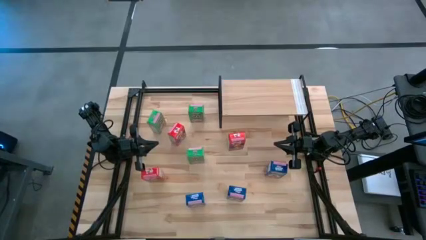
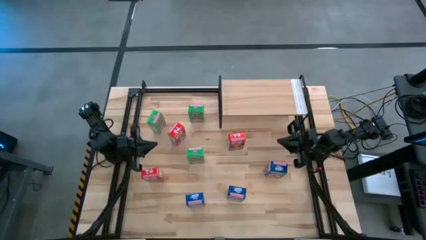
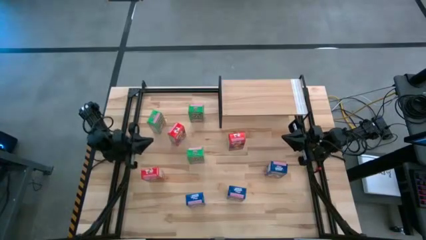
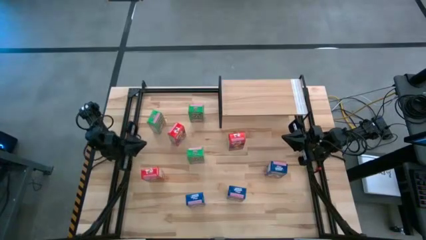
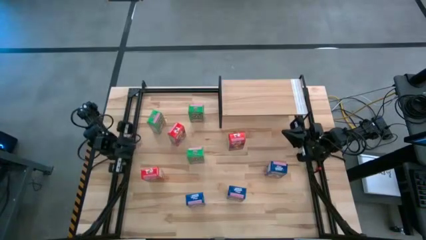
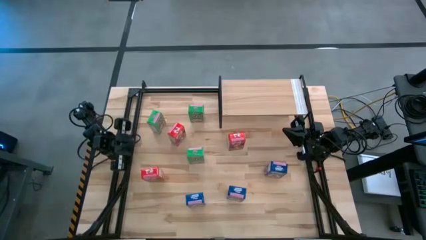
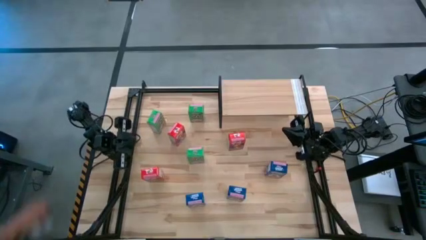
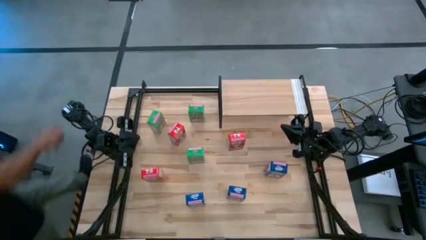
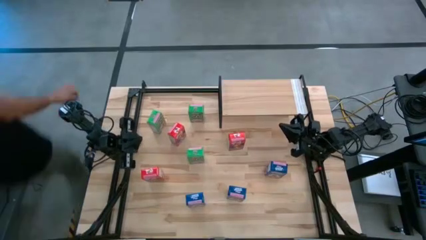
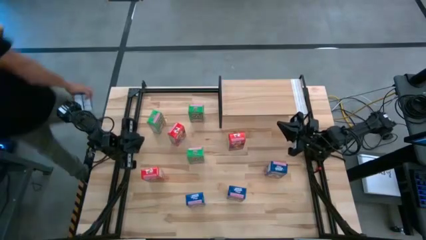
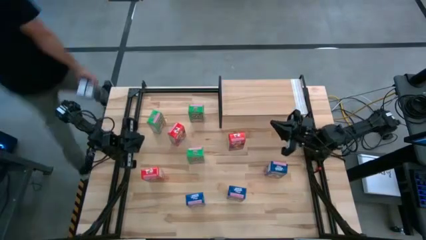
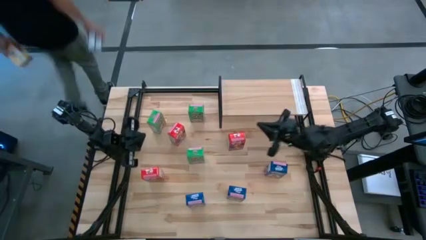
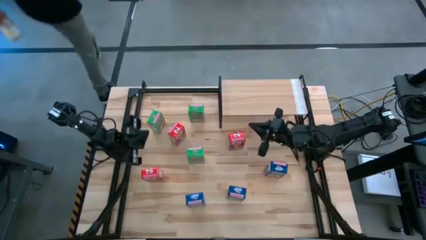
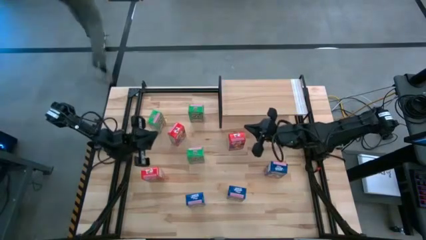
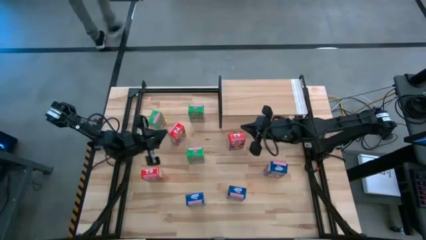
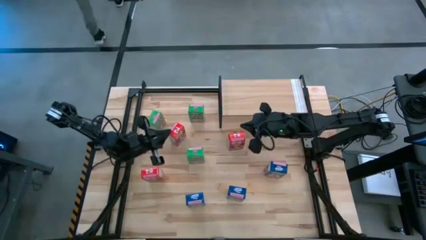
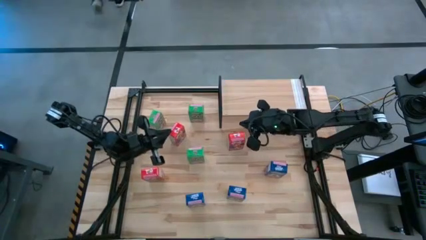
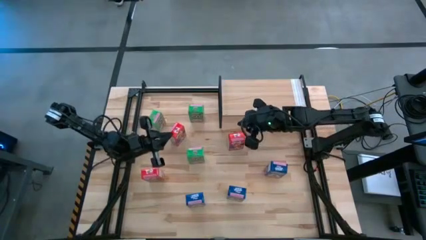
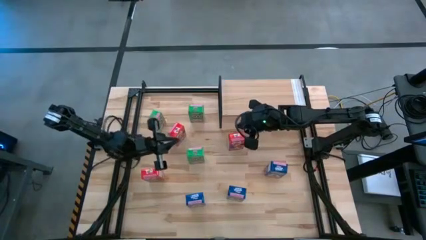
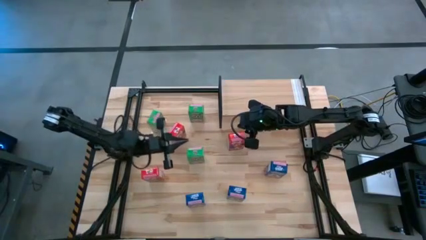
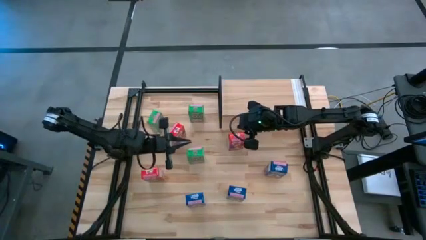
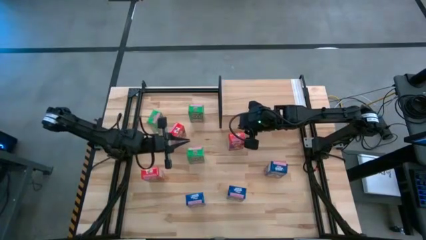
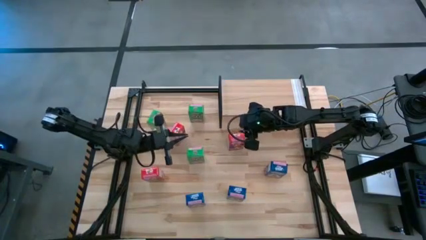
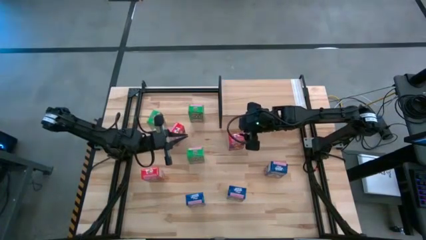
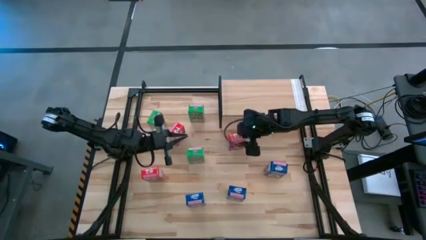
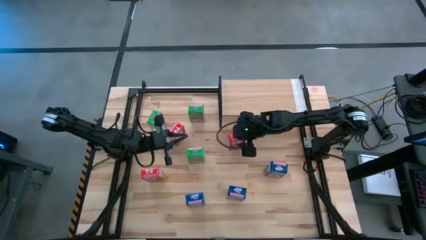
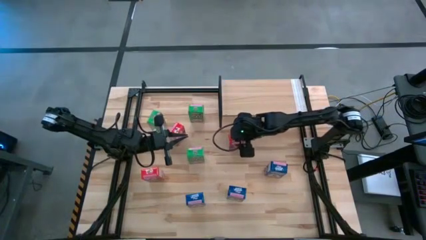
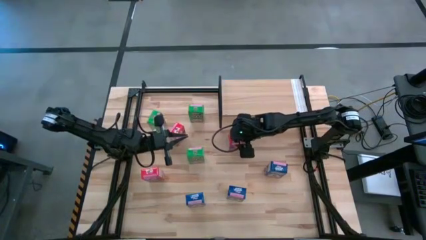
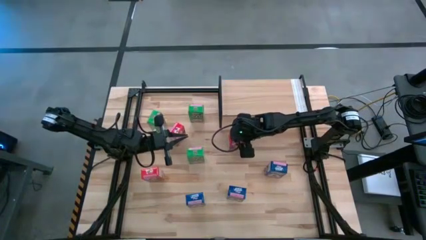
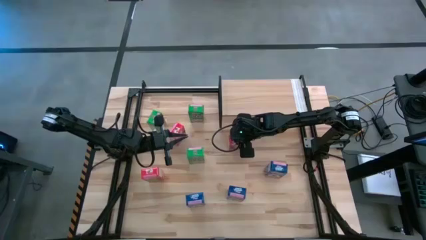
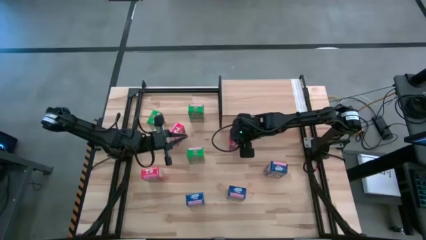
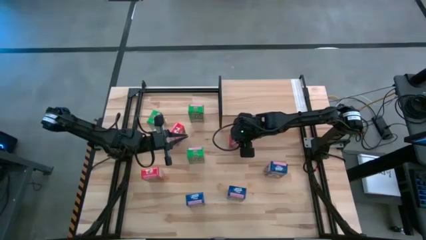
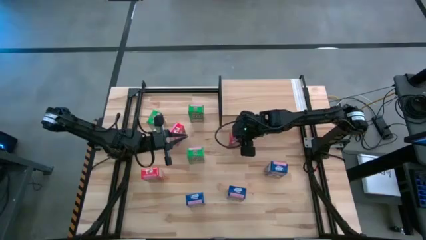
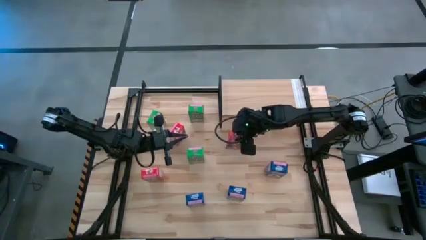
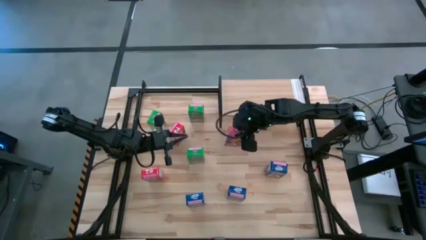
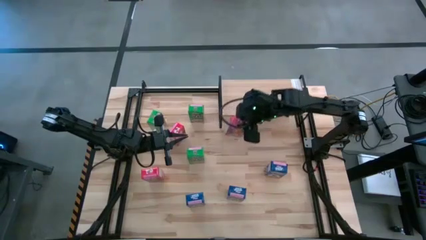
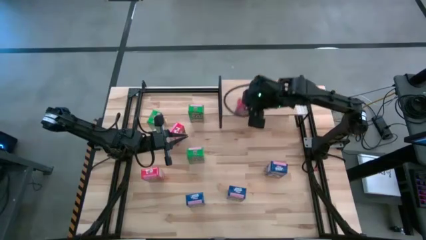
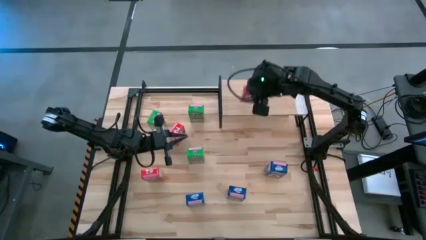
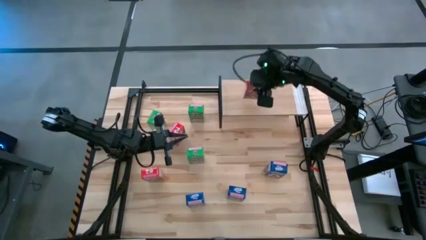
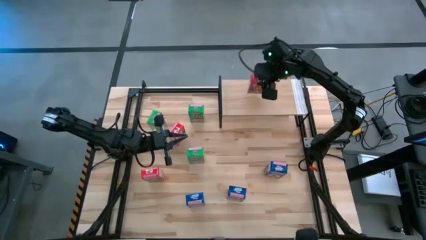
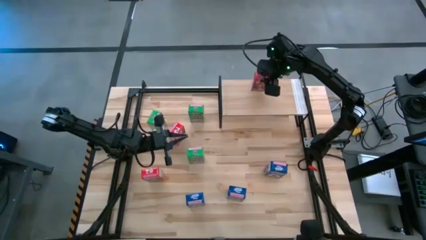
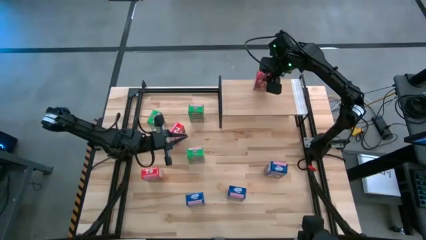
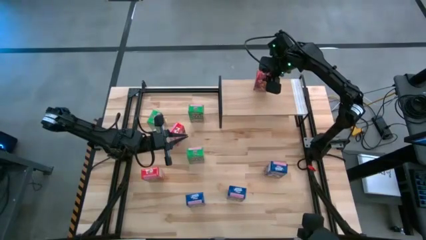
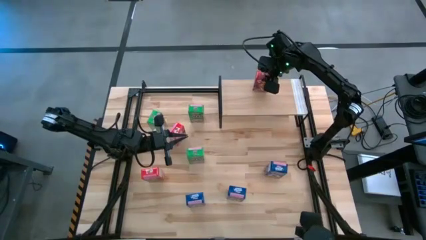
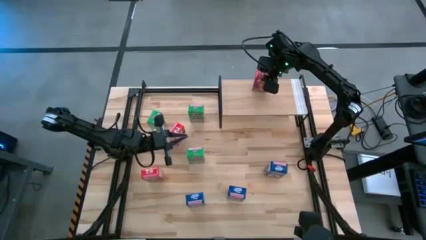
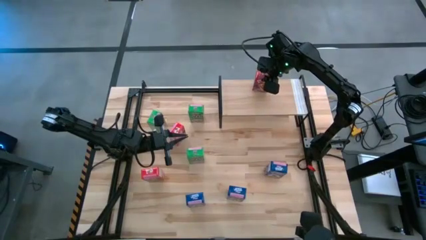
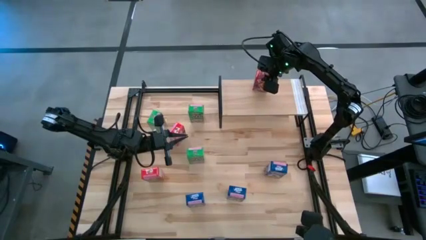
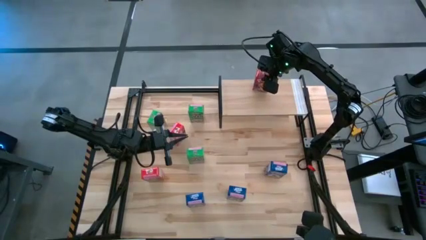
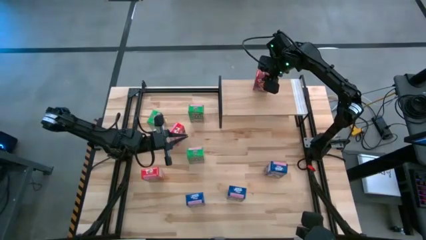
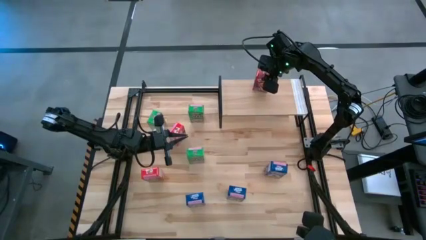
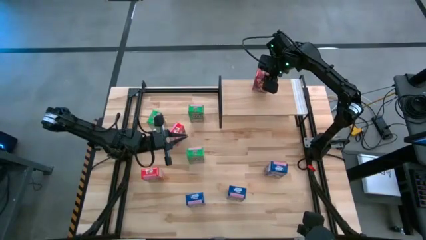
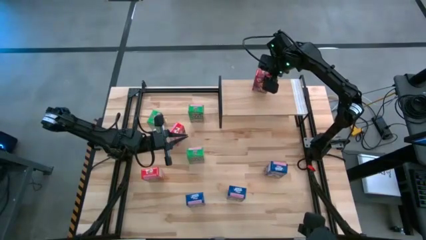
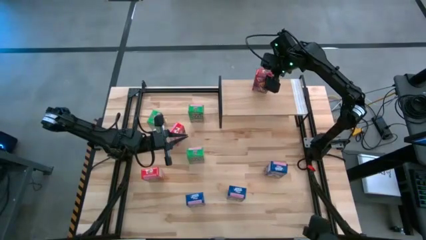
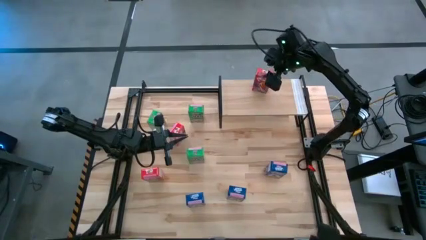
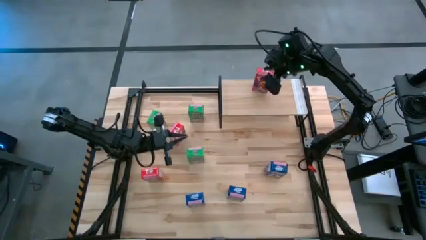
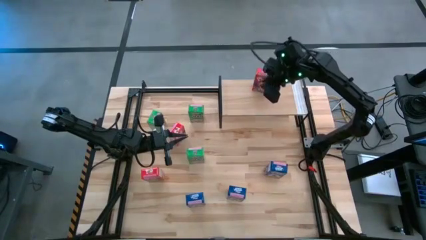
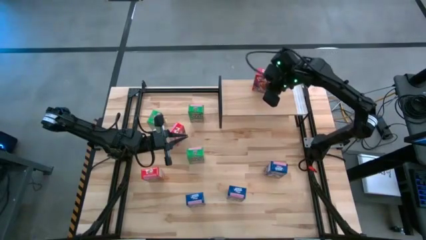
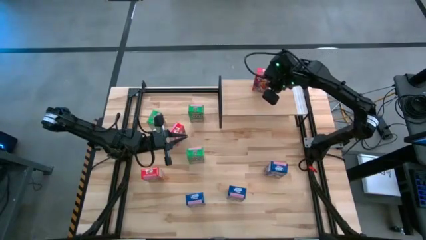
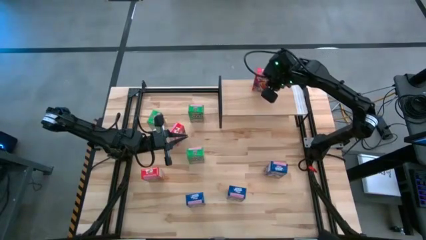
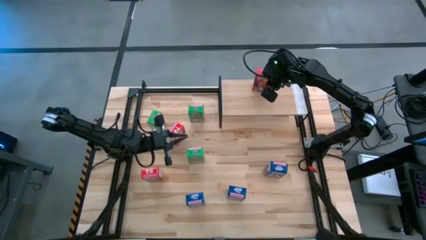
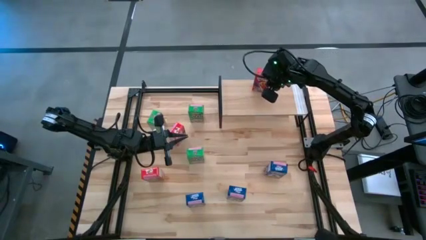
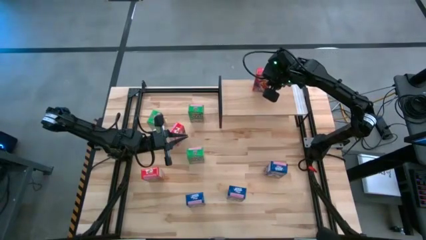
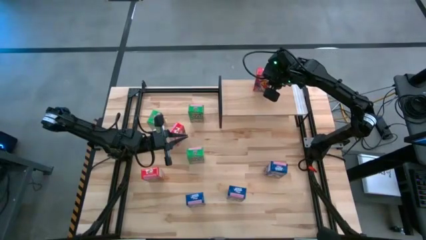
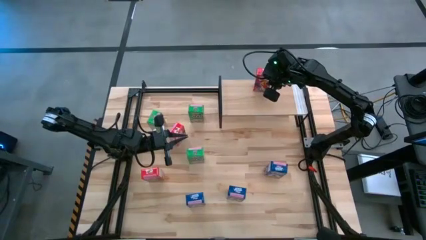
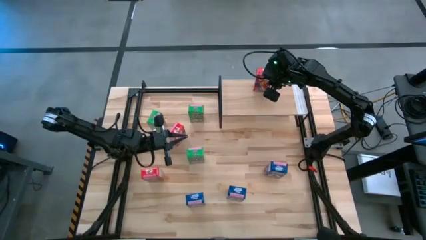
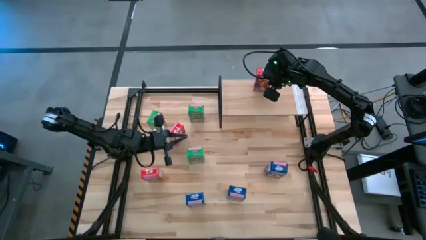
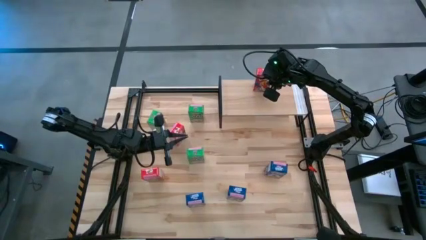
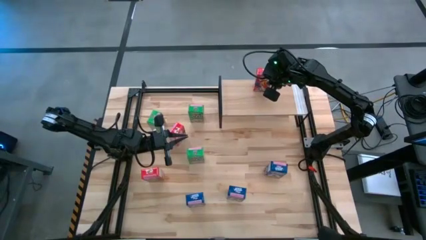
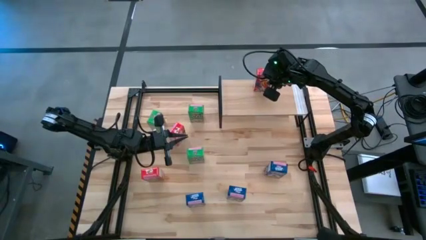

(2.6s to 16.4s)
Task: Stack cereal on shelf
Put the right red cereal box on the shelf
